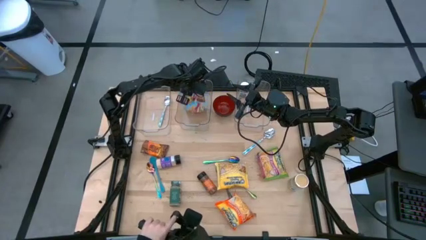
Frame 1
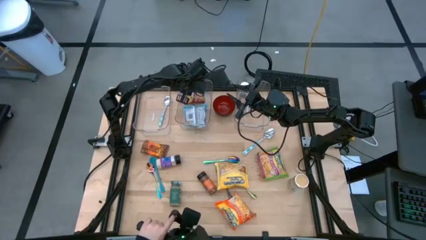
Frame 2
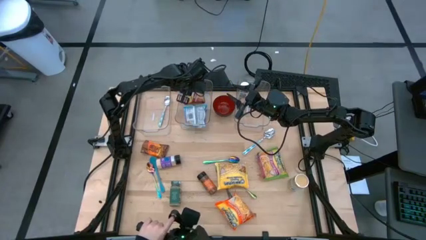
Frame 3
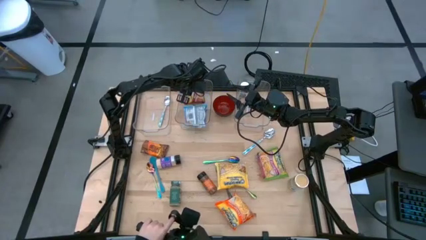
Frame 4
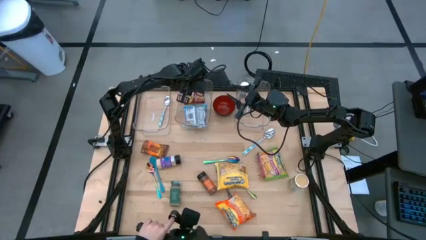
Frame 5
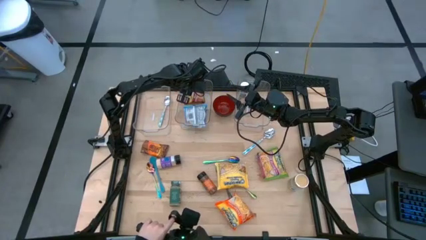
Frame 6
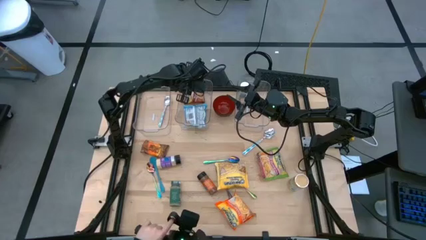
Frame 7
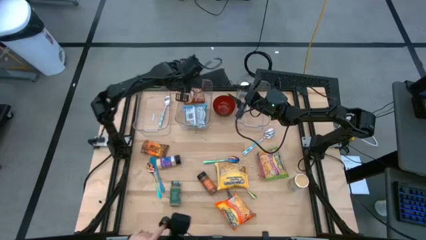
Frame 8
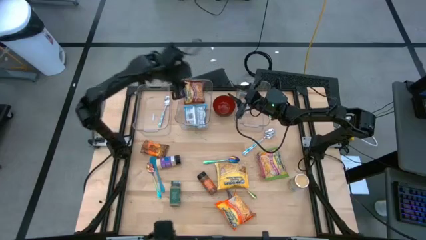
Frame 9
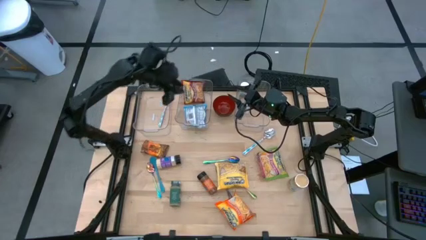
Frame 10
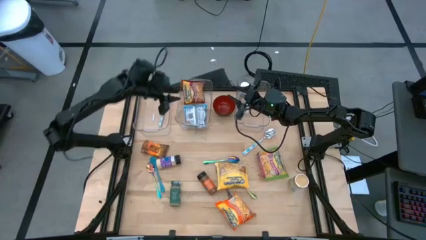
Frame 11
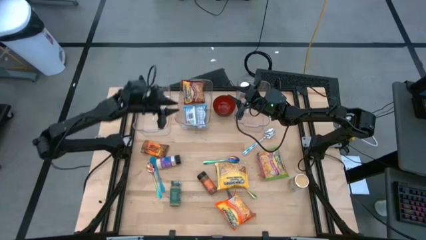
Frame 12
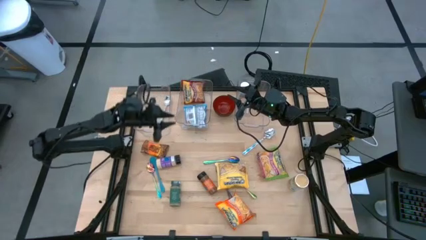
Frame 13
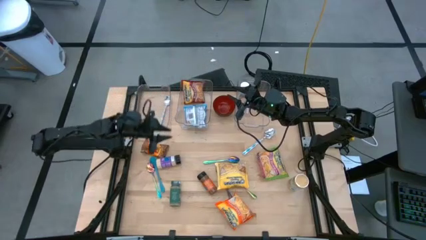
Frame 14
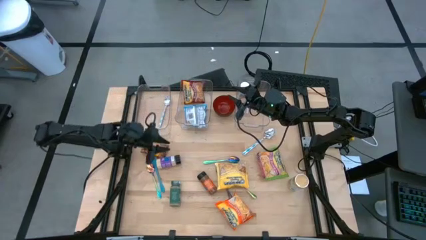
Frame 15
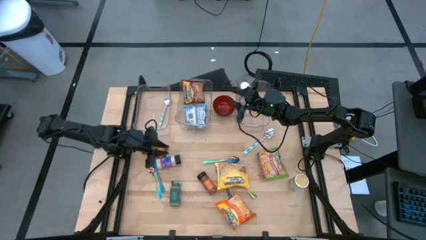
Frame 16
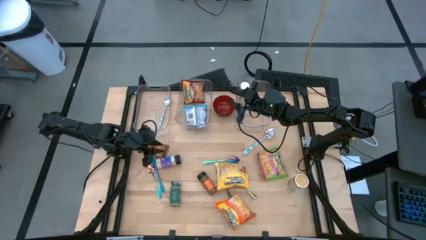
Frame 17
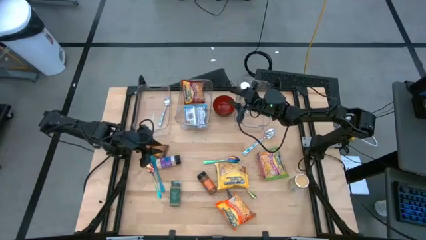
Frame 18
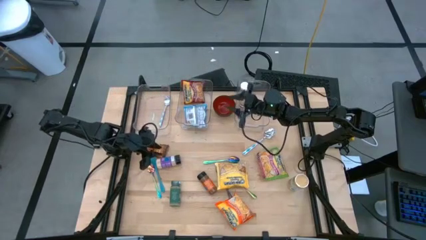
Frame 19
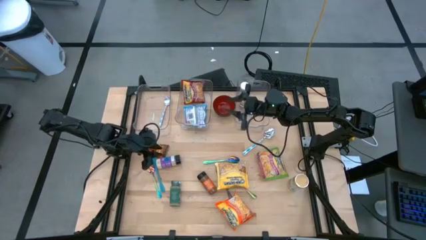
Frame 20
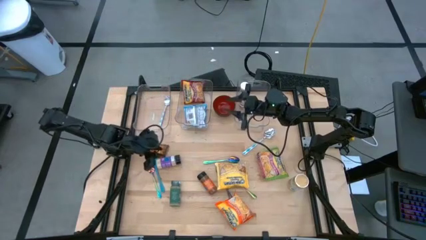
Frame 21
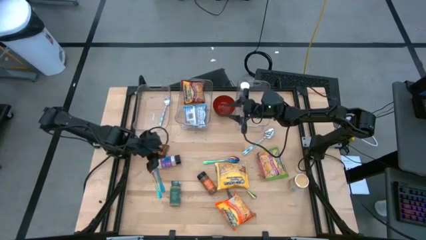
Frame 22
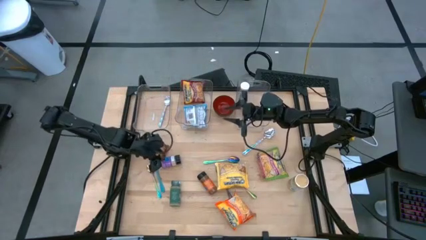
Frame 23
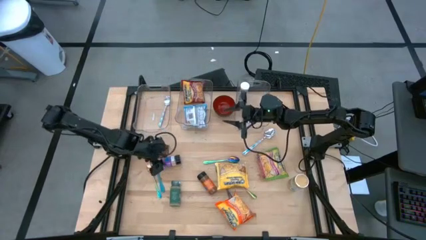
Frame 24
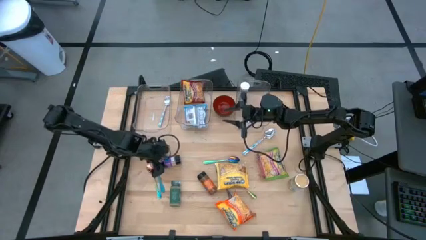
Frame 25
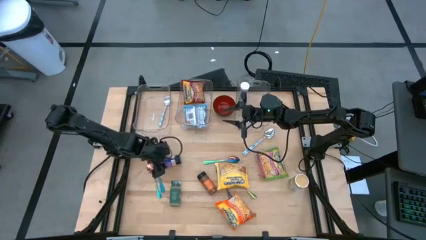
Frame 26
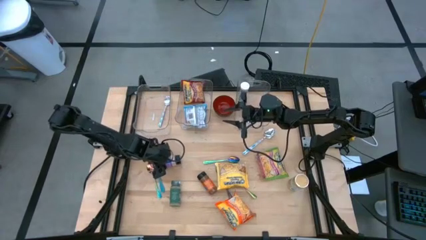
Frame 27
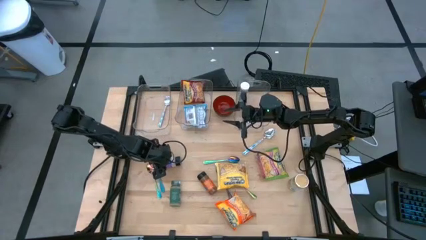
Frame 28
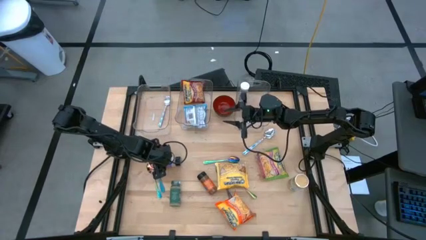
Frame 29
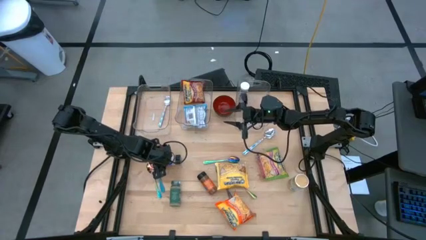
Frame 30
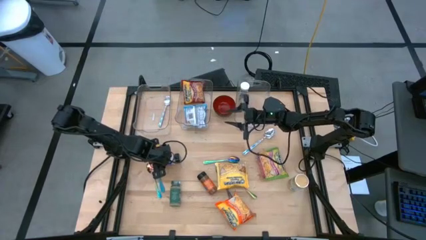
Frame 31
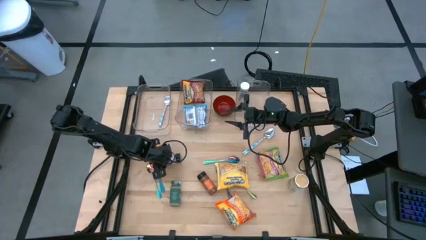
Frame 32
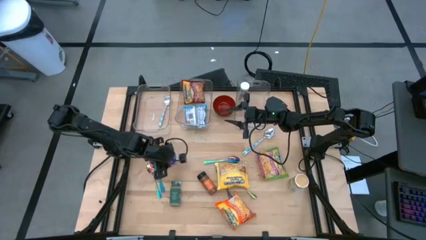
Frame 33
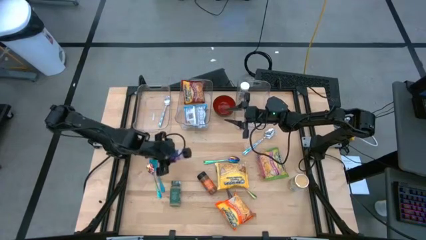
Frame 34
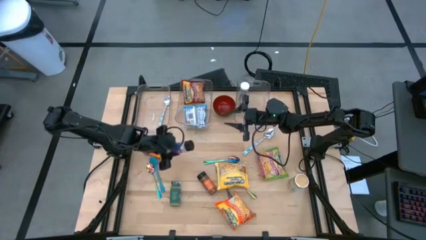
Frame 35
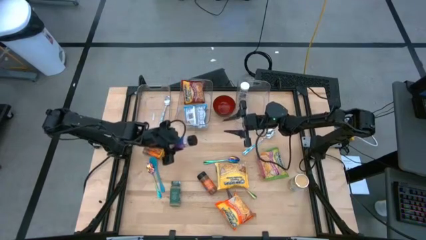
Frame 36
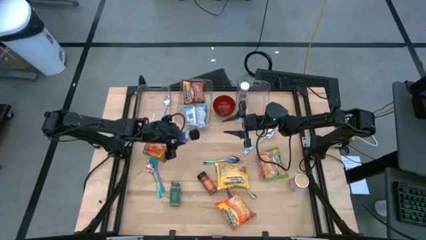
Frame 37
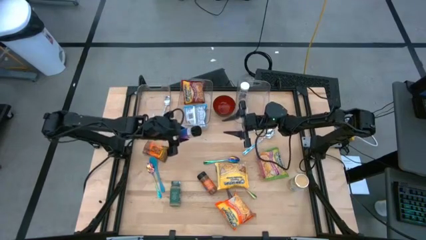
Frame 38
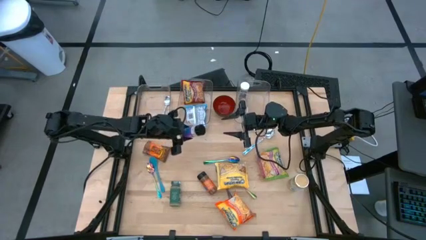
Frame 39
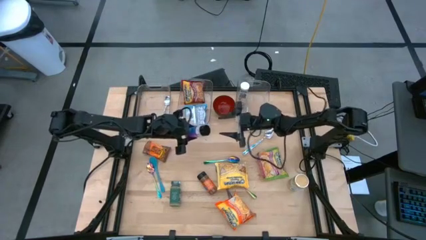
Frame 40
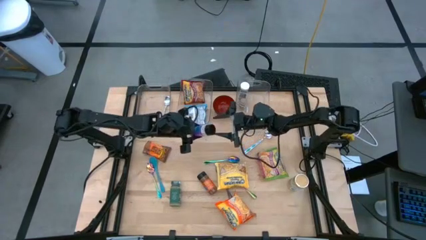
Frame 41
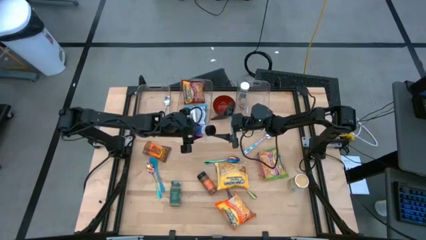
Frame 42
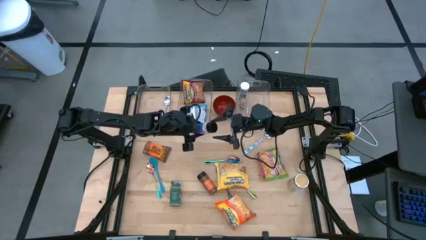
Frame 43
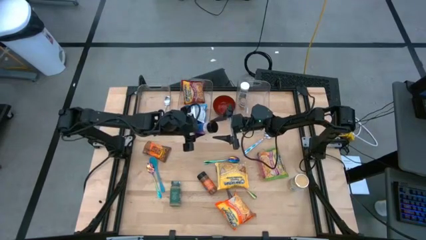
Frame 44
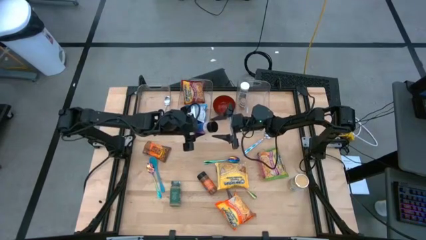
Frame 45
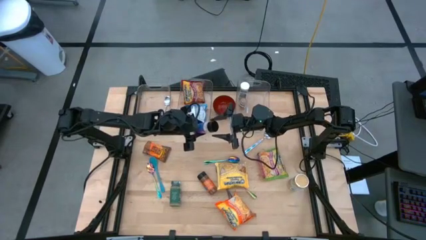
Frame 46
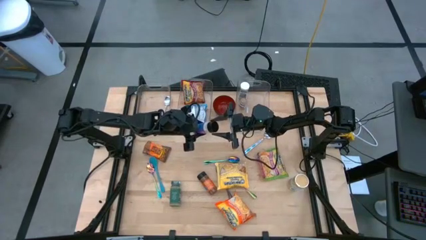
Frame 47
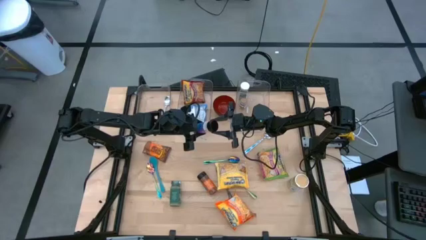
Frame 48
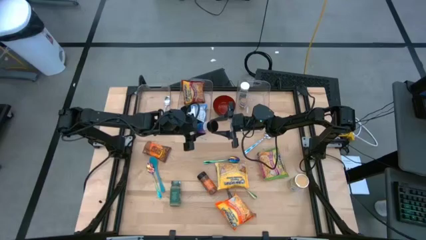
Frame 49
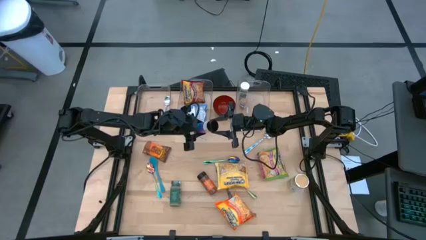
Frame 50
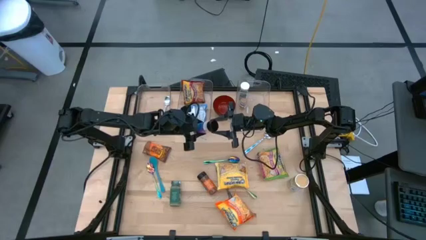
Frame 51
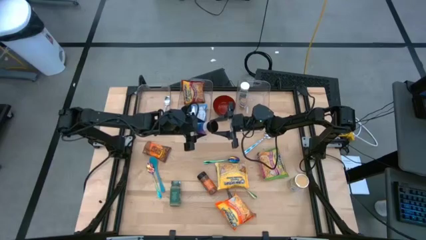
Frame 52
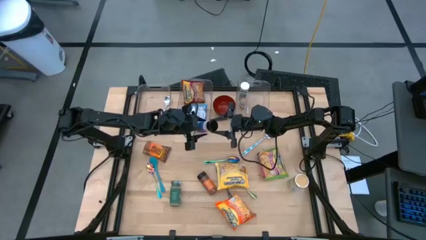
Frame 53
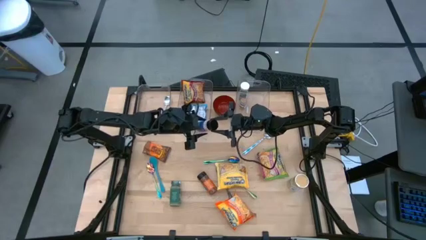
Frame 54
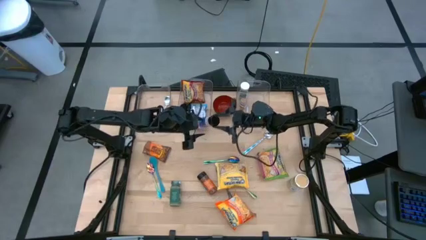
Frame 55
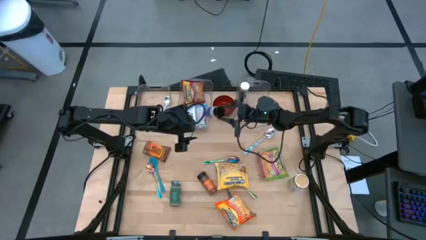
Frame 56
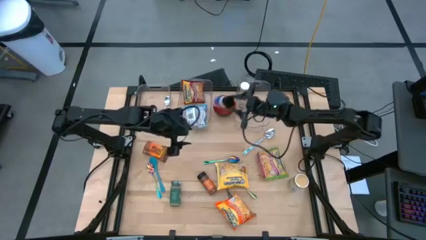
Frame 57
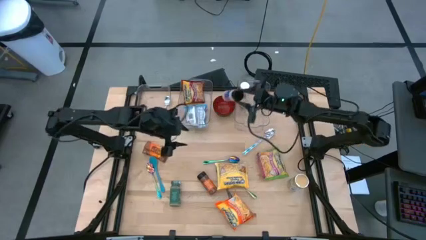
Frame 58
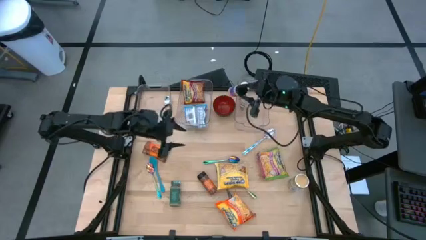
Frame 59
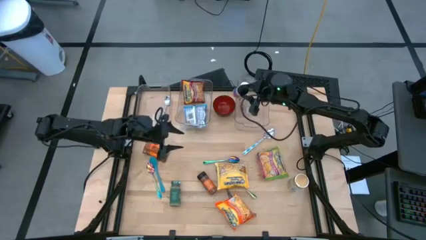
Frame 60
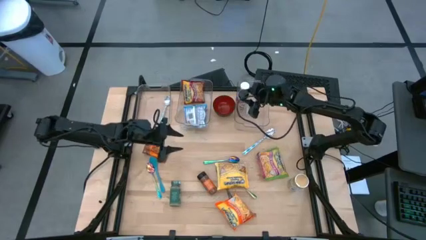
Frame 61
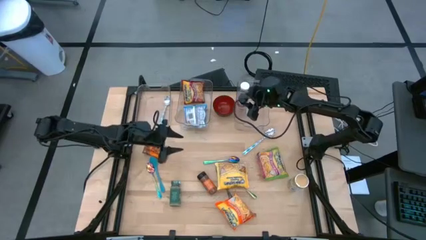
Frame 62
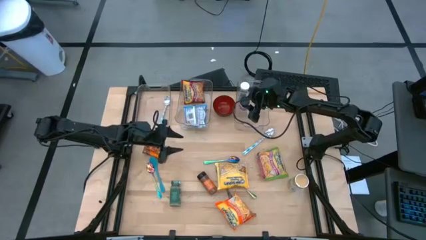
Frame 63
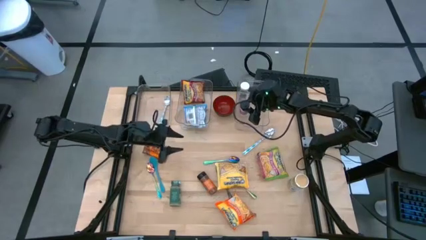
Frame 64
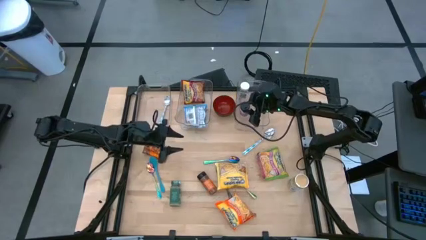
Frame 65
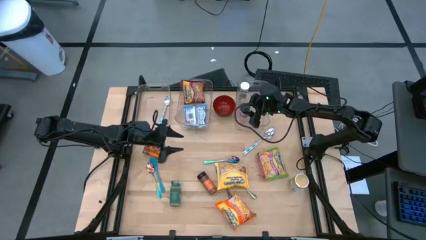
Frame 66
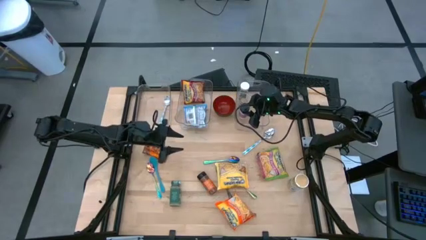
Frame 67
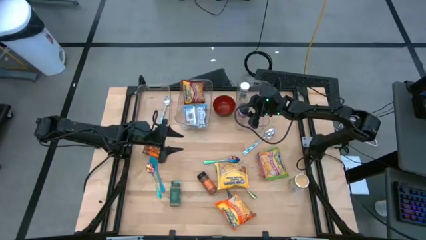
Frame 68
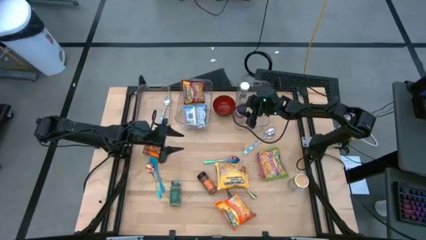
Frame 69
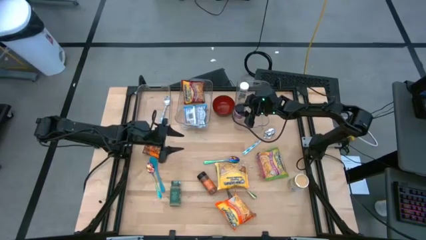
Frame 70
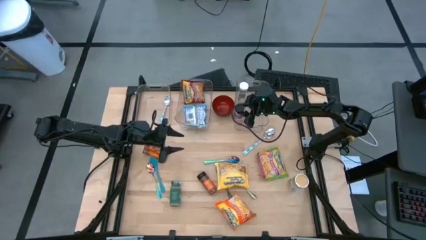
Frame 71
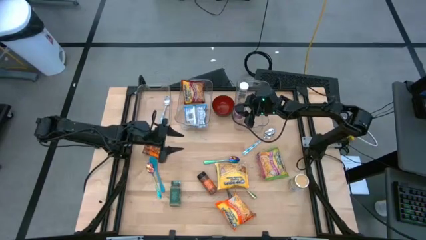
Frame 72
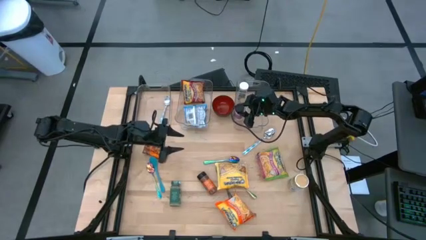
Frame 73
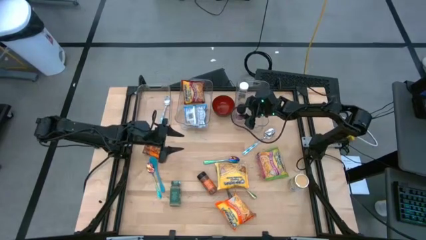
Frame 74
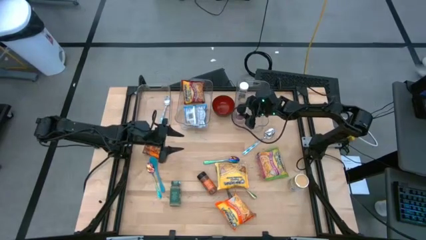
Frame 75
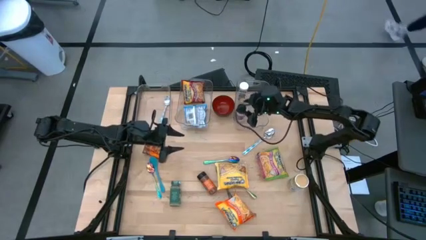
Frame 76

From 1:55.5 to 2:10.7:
Task: Pick & Place Food Item
Put the purple seasoning bottle into the right transparent bin
